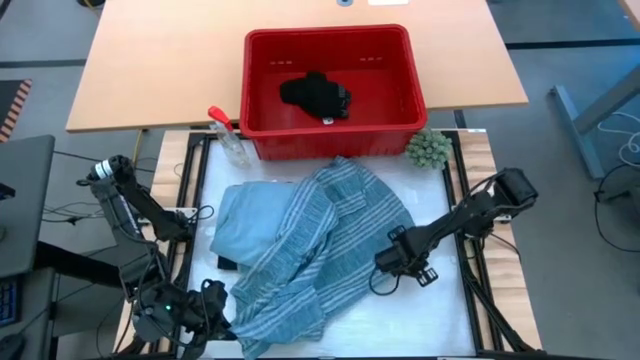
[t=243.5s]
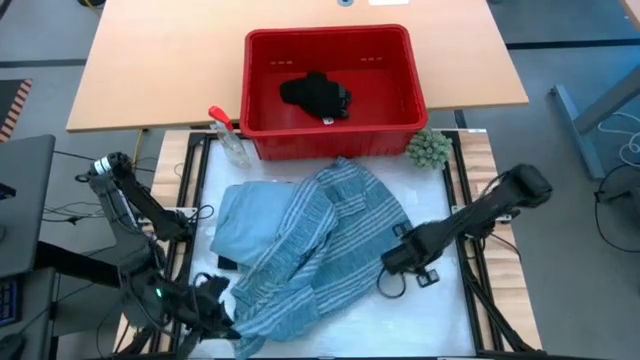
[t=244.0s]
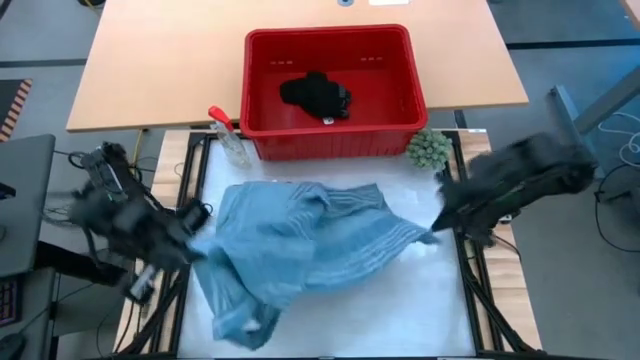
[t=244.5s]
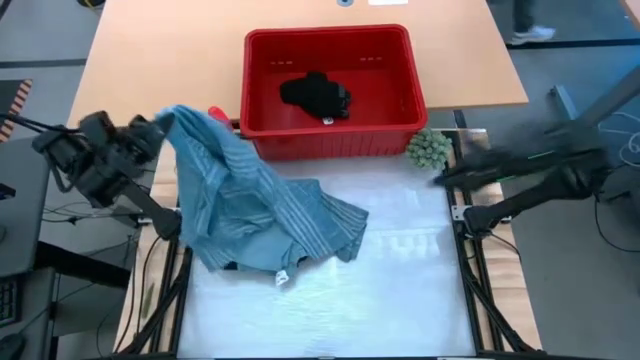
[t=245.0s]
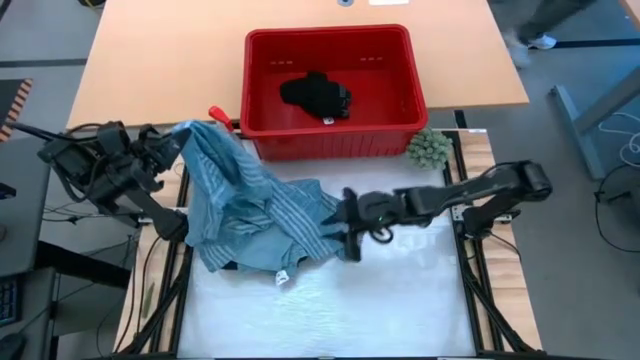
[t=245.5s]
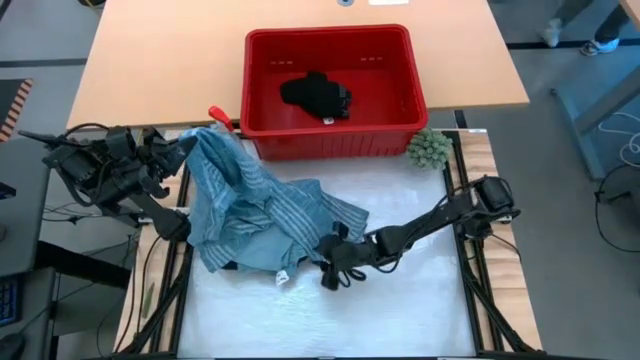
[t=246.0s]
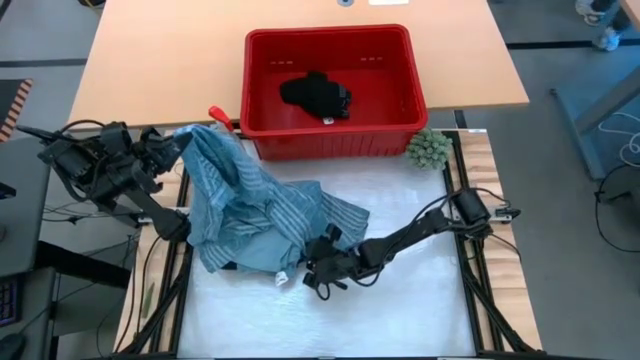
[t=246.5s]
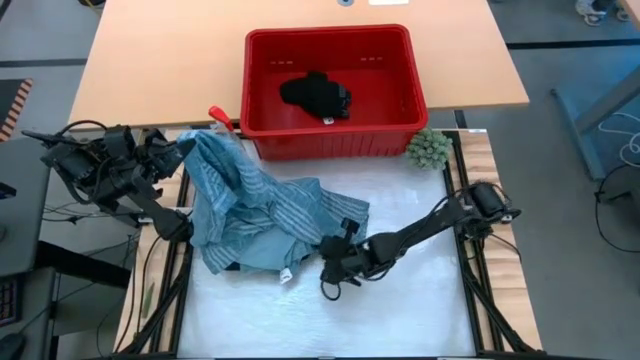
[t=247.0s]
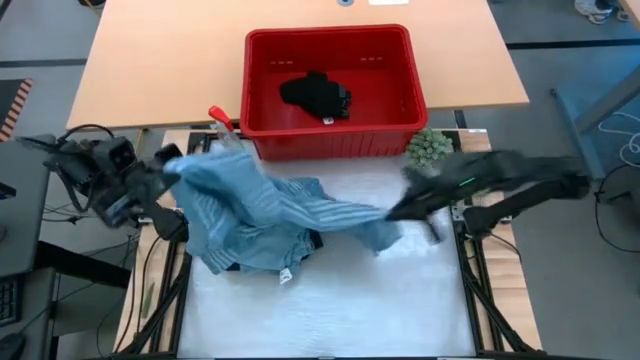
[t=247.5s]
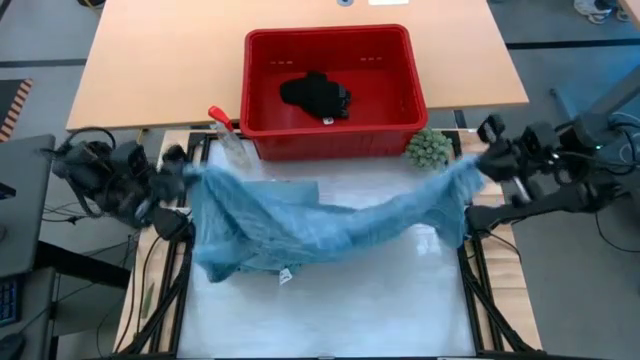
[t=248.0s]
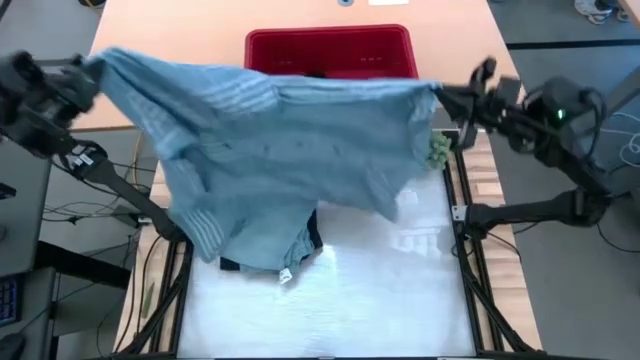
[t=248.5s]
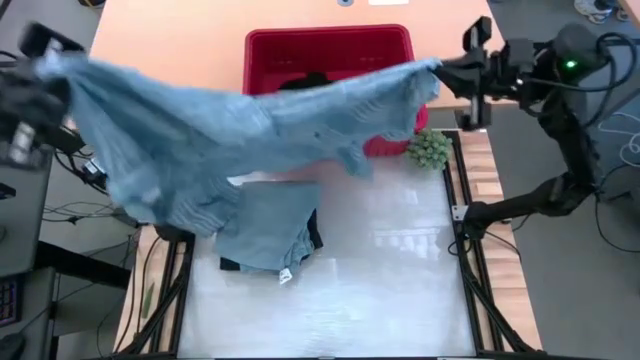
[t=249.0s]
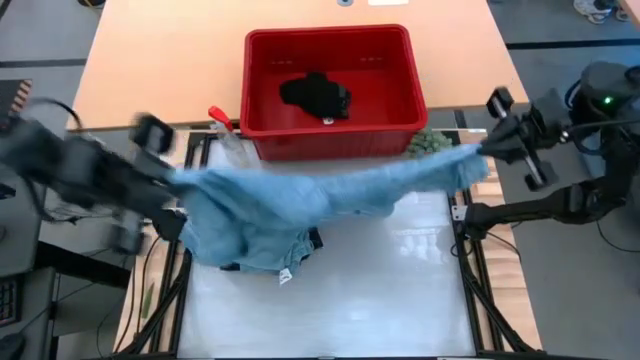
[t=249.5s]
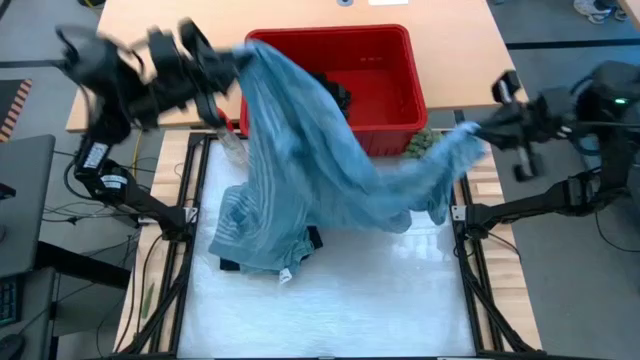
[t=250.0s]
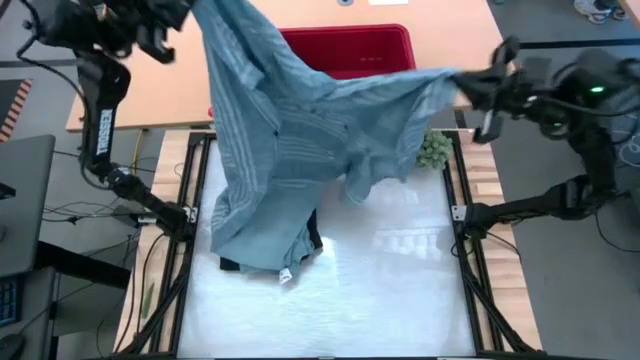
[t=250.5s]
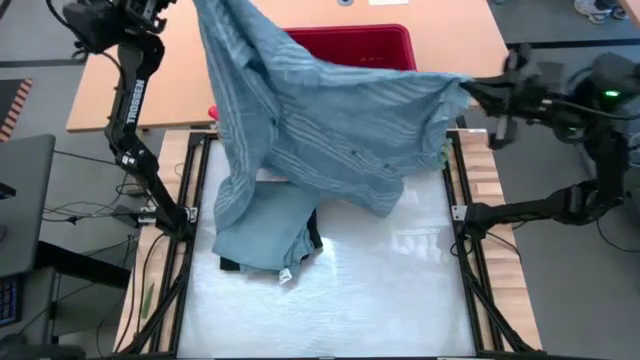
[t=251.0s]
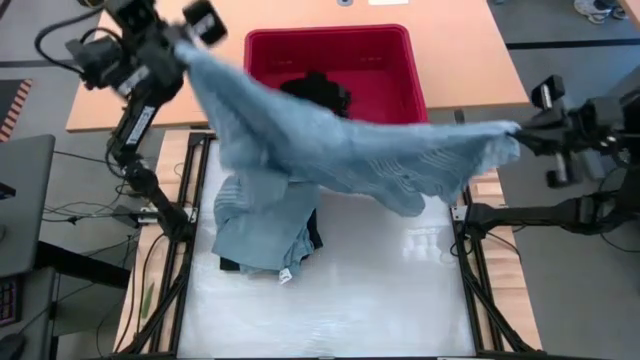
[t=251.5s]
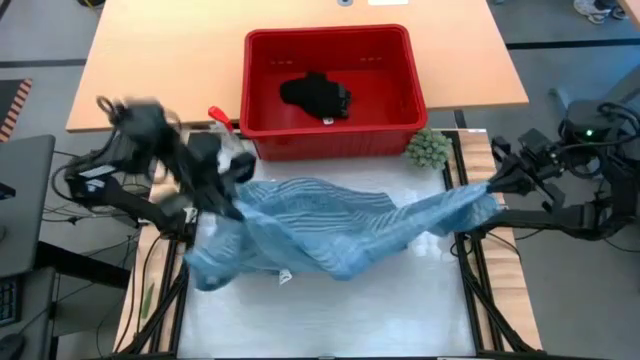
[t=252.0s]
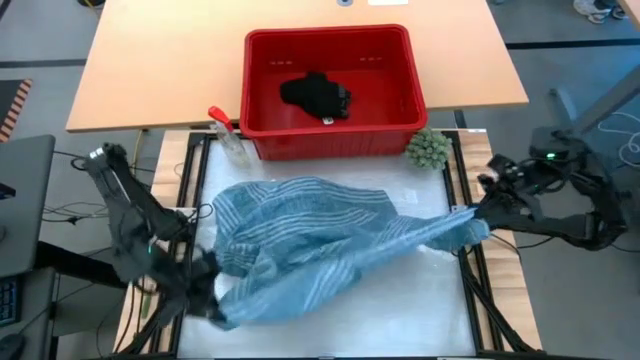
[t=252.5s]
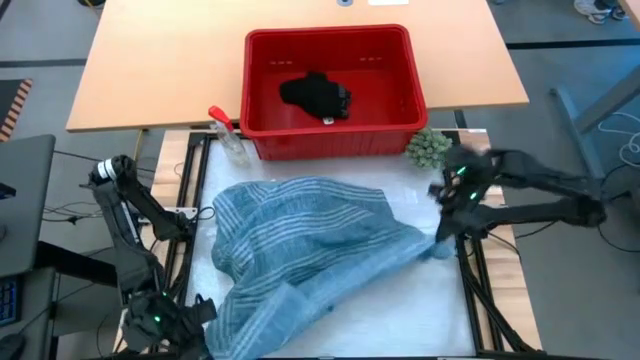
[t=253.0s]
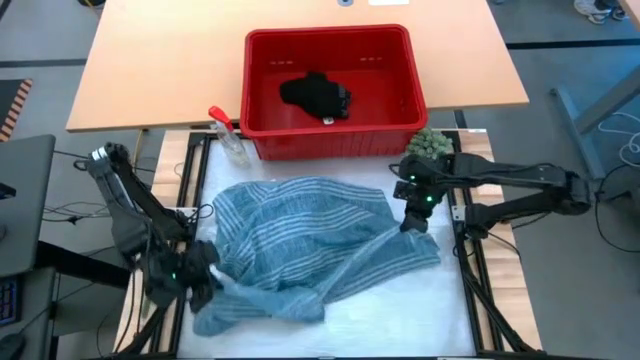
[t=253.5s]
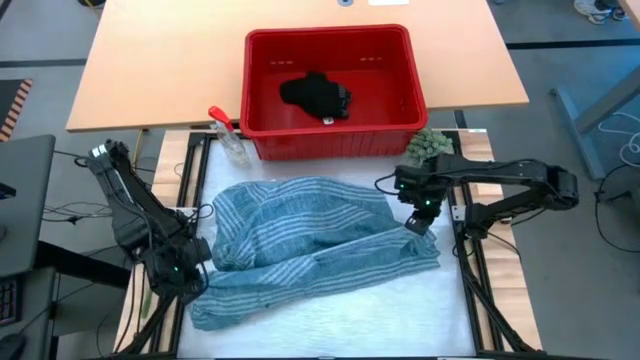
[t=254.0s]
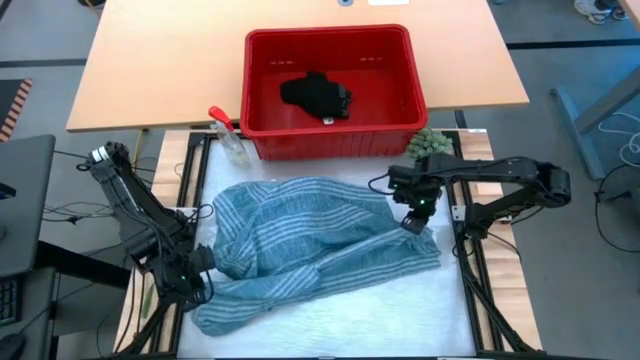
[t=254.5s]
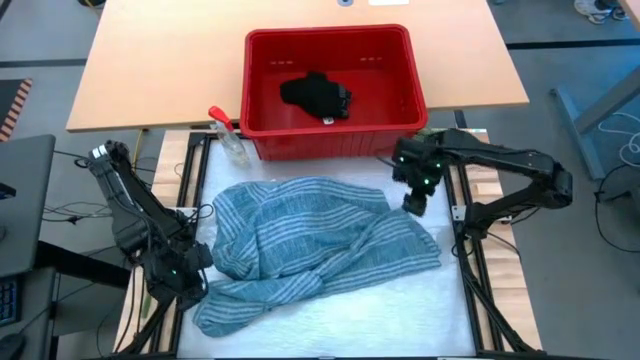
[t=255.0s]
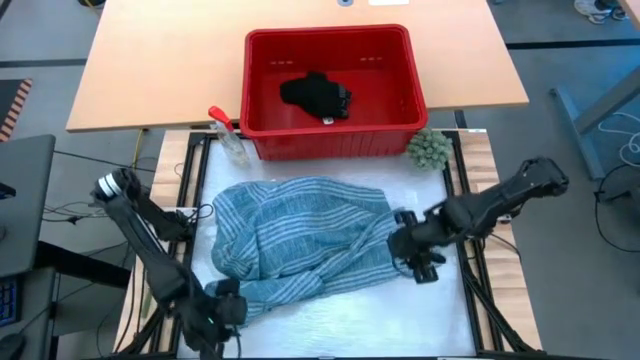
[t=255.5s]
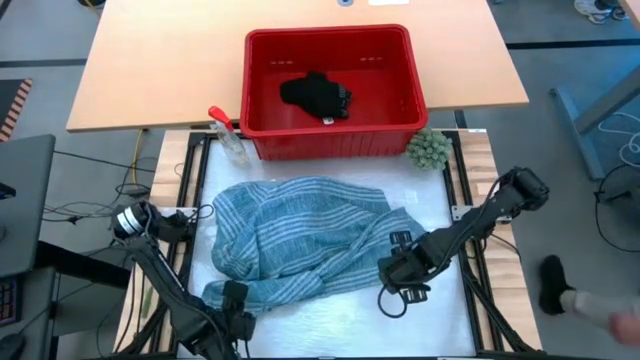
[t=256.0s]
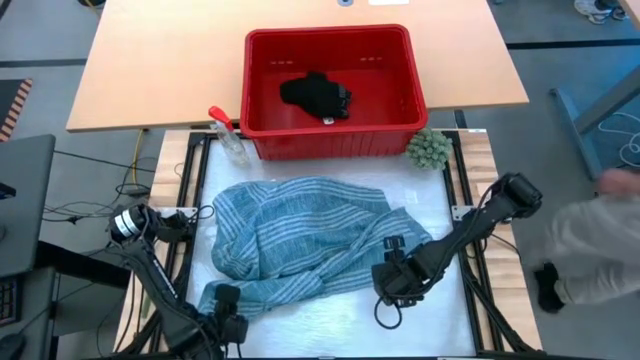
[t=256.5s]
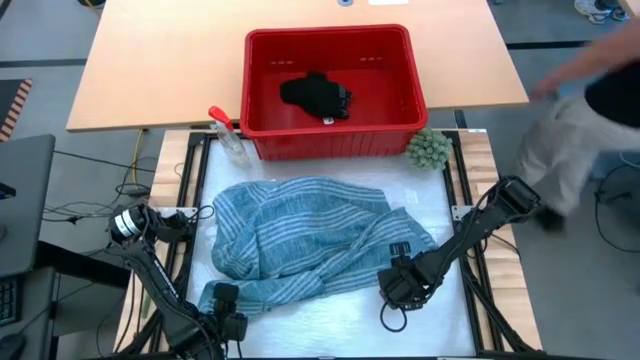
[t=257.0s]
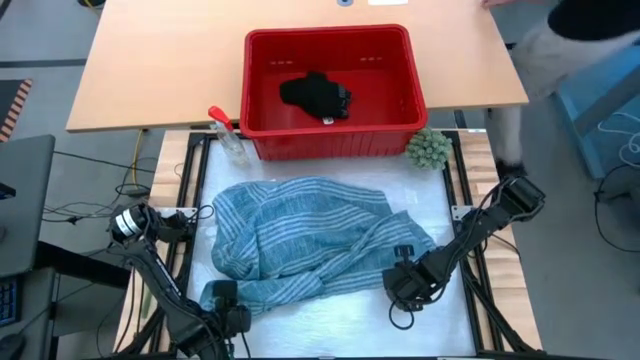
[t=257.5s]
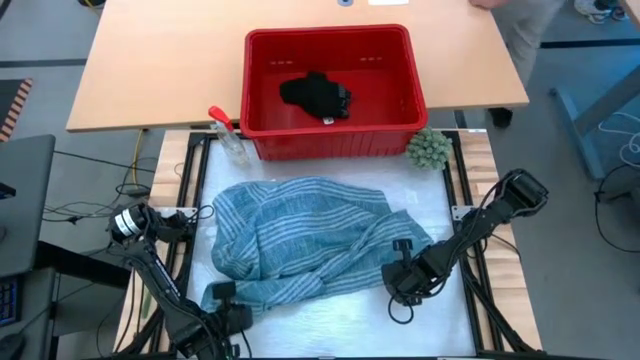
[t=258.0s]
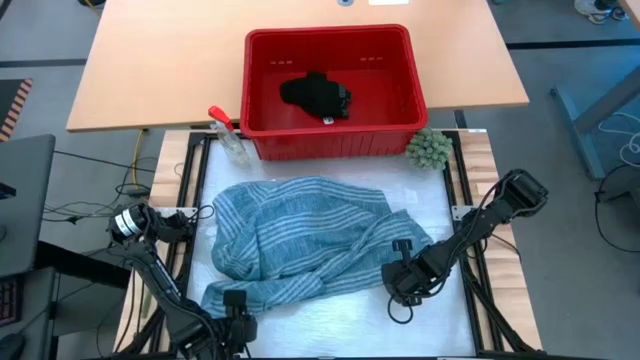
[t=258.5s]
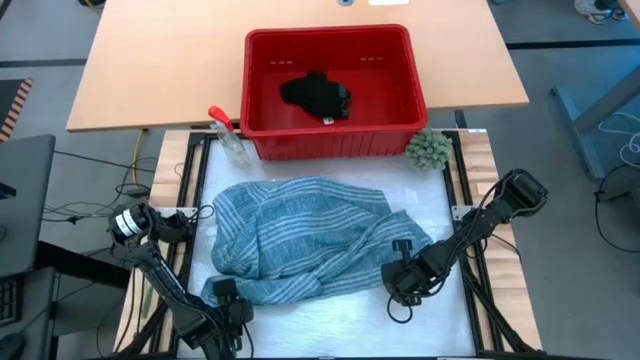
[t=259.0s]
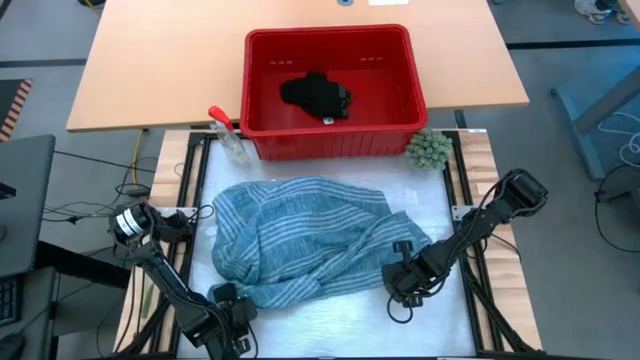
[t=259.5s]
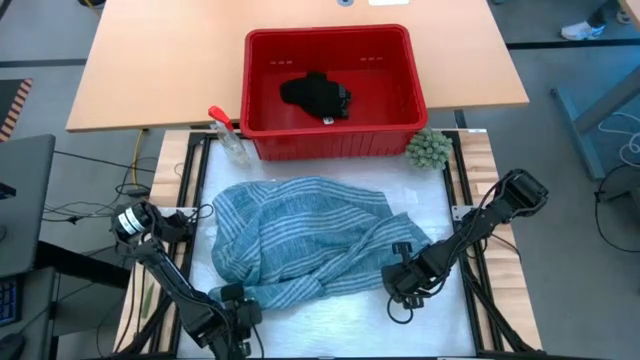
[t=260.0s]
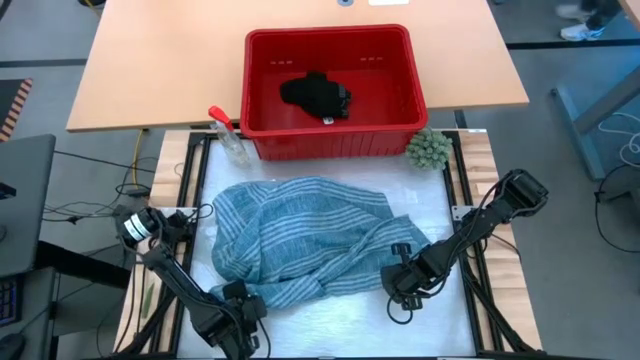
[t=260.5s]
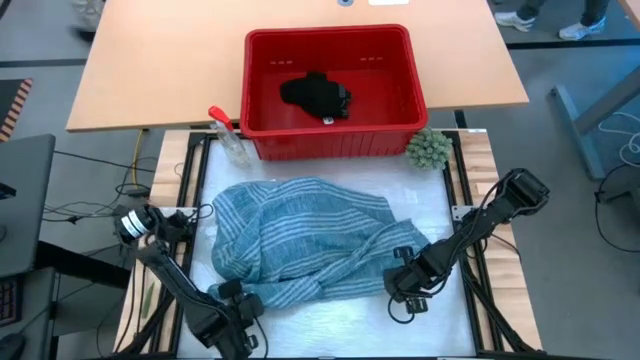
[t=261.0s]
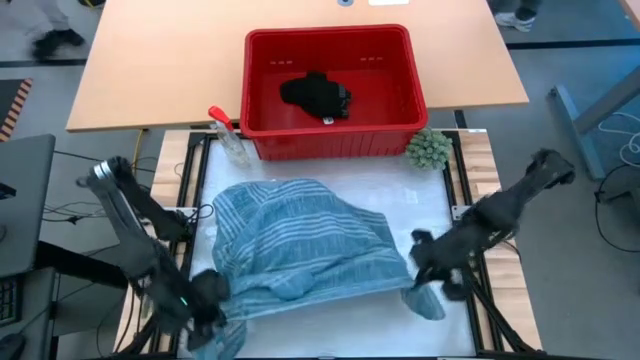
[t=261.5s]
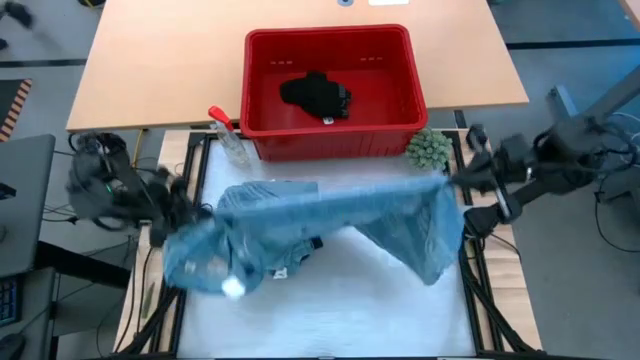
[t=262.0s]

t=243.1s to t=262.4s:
Task: Fold Laundry from Bin
Fold the light blue polo shirt

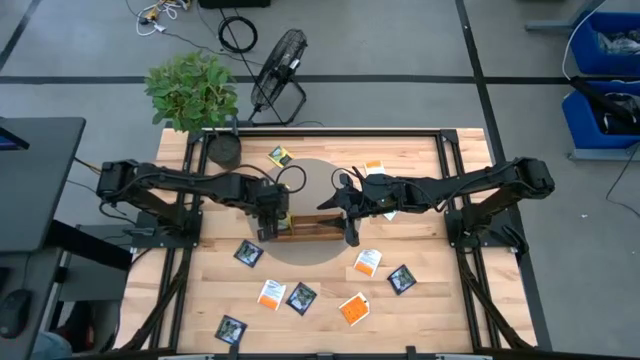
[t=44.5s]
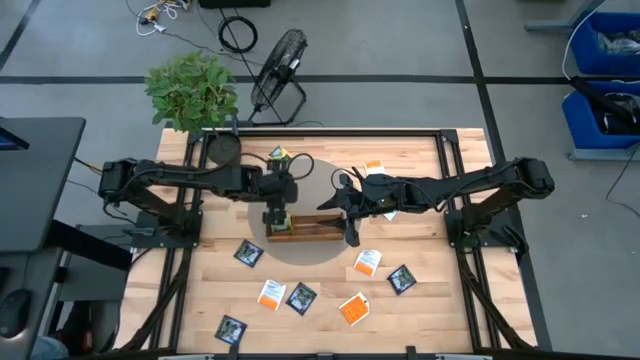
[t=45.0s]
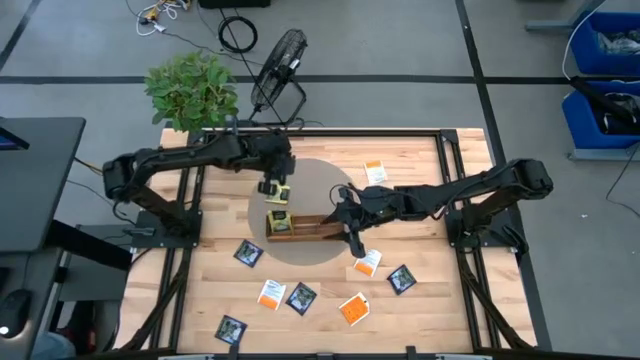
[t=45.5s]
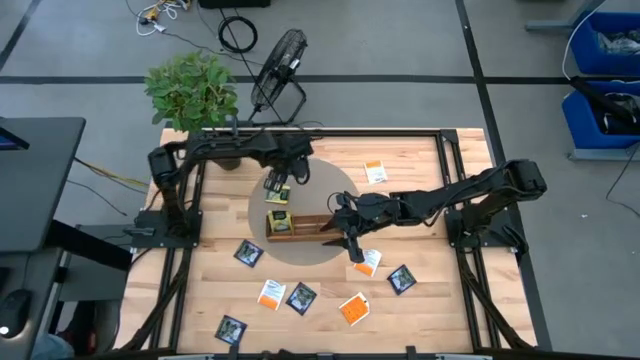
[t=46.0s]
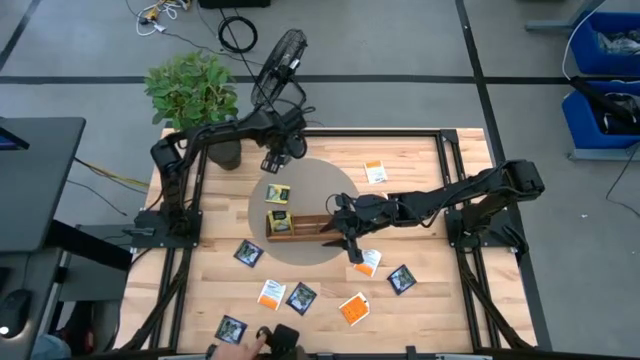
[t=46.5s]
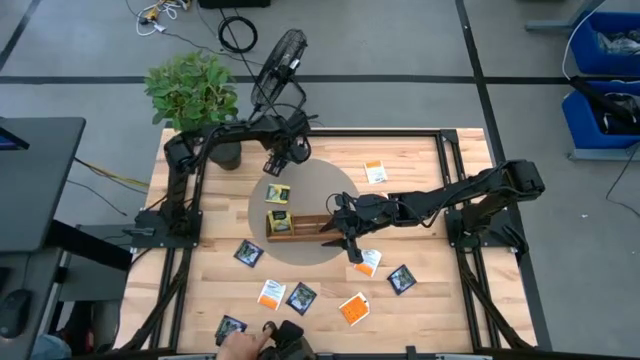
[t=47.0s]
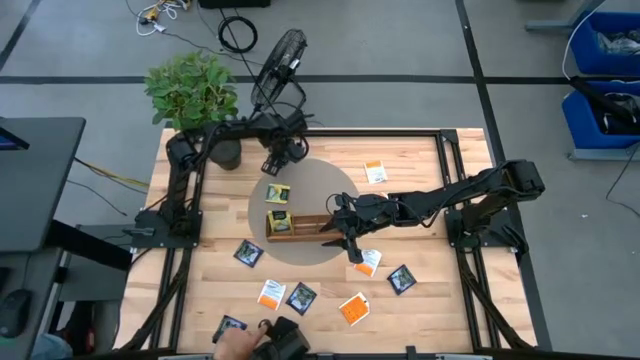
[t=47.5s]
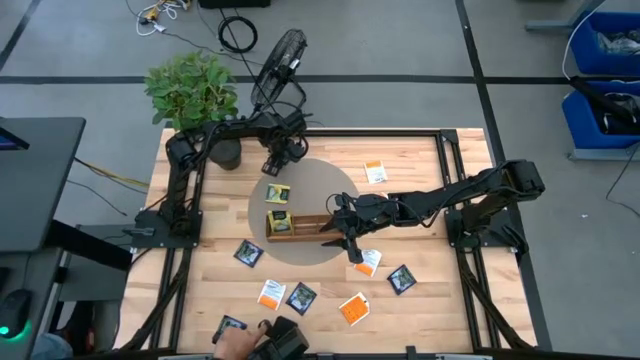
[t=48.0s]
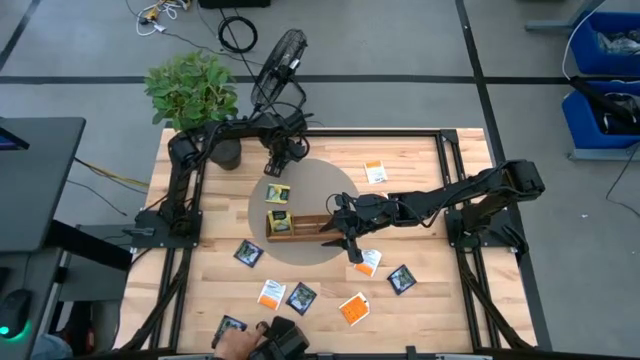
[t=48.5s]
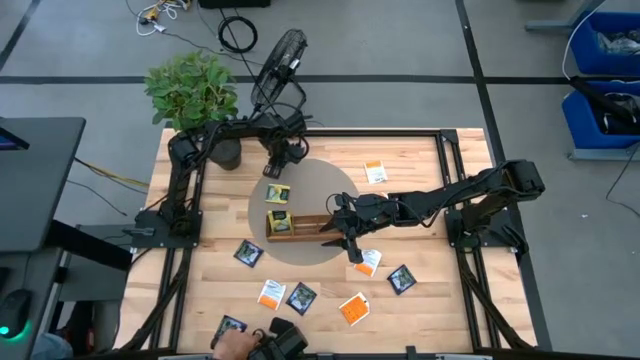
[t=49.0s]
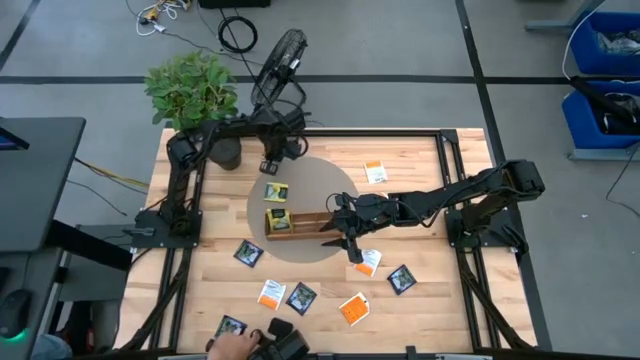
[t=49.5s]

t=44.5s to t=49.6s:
Task: Pick & Place Tea
Put the top yellow tea bag into the wooden organizer
